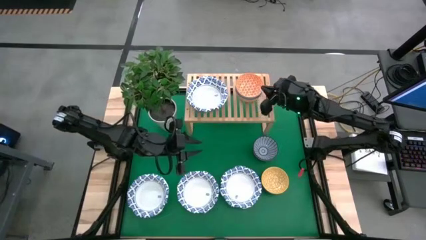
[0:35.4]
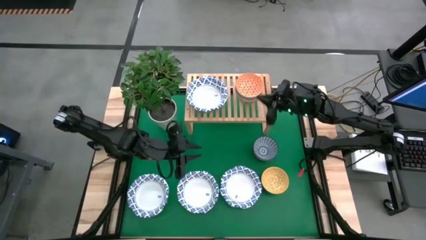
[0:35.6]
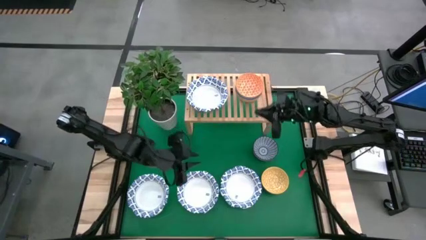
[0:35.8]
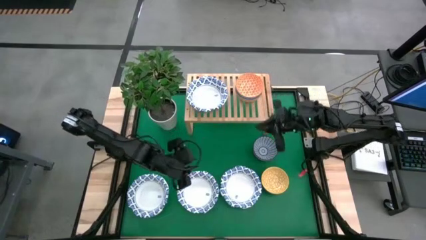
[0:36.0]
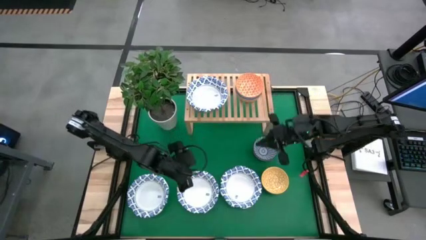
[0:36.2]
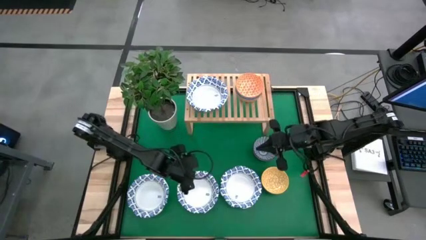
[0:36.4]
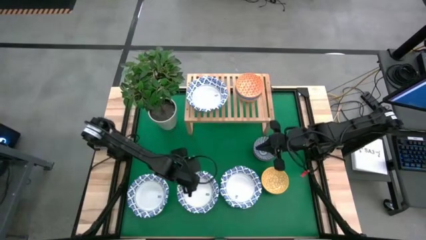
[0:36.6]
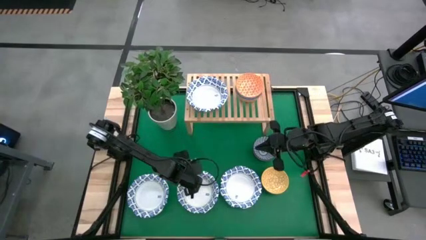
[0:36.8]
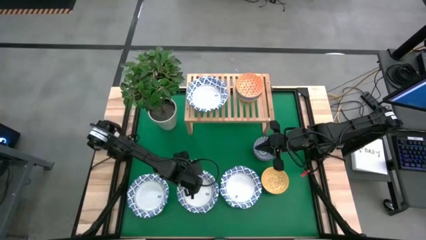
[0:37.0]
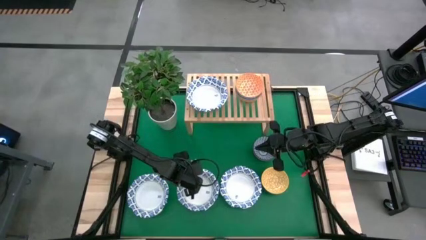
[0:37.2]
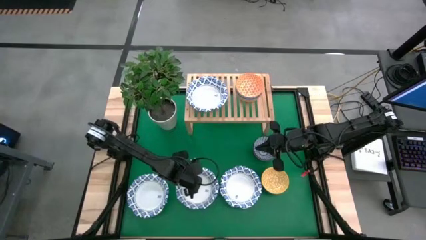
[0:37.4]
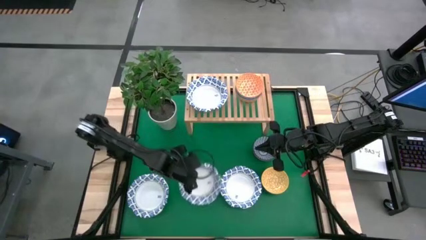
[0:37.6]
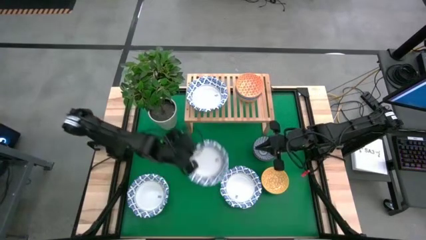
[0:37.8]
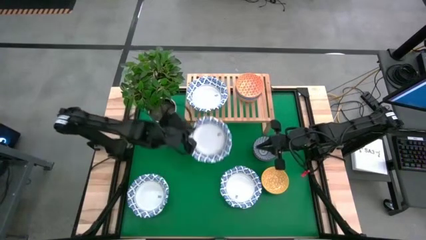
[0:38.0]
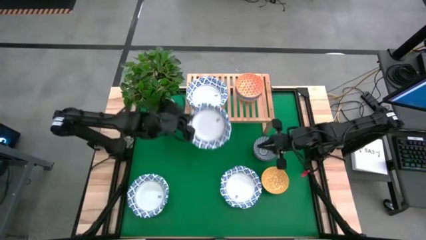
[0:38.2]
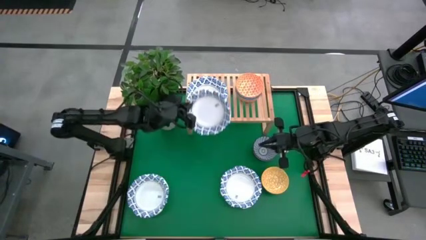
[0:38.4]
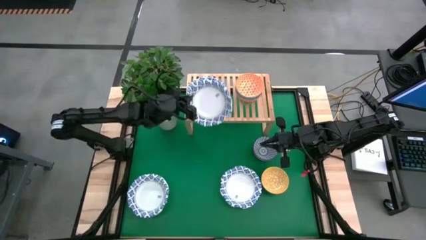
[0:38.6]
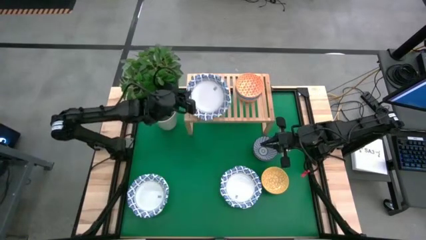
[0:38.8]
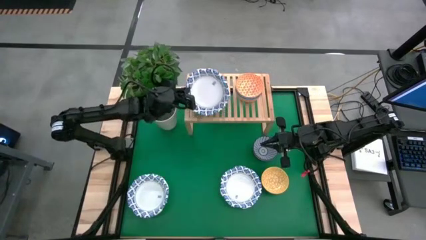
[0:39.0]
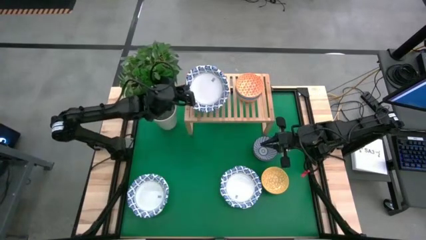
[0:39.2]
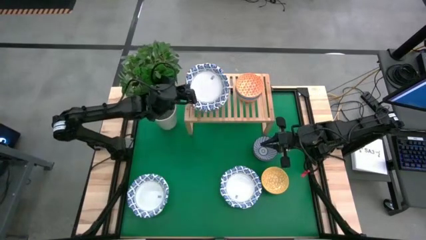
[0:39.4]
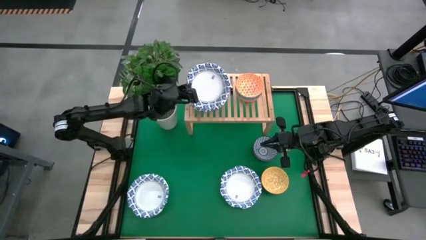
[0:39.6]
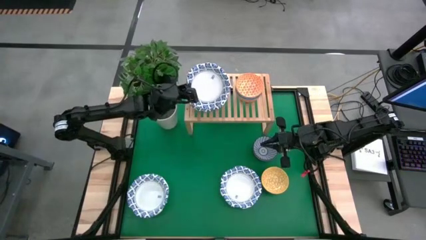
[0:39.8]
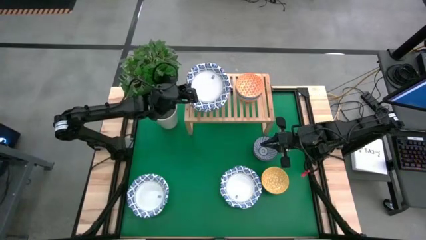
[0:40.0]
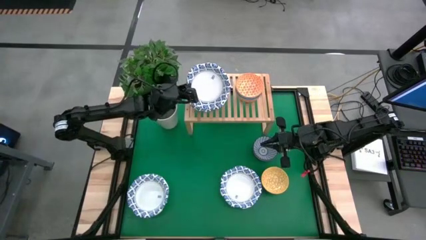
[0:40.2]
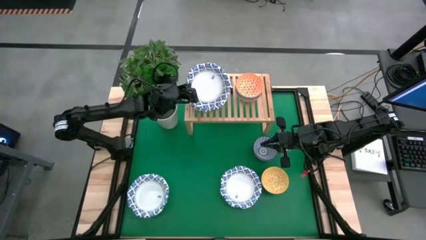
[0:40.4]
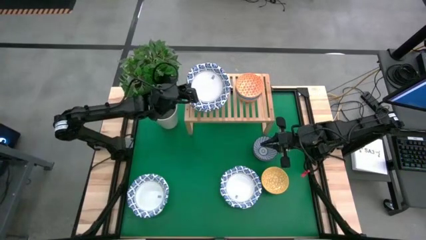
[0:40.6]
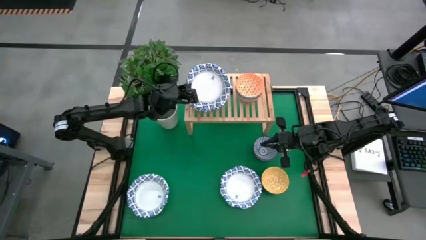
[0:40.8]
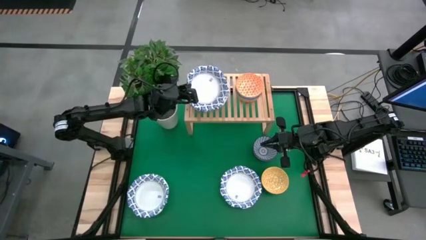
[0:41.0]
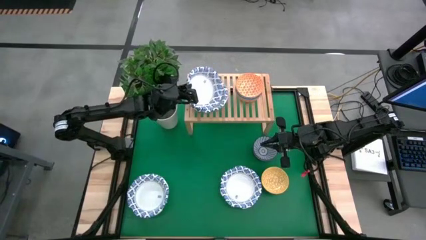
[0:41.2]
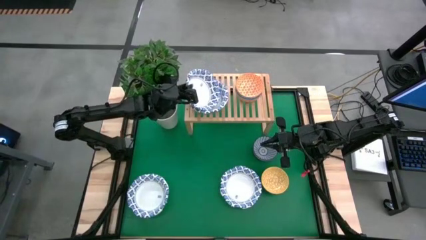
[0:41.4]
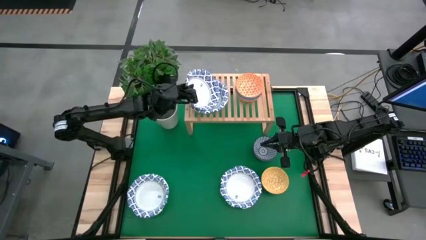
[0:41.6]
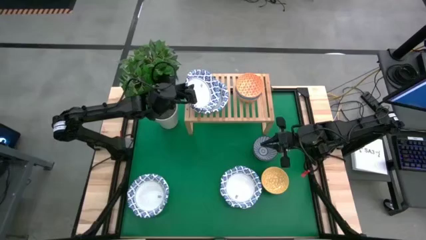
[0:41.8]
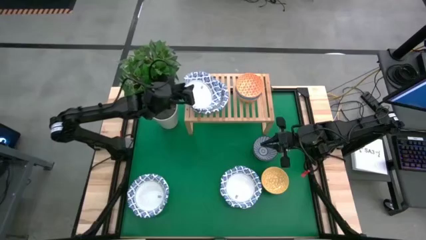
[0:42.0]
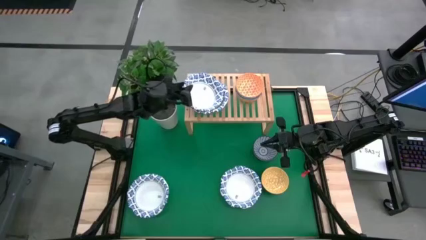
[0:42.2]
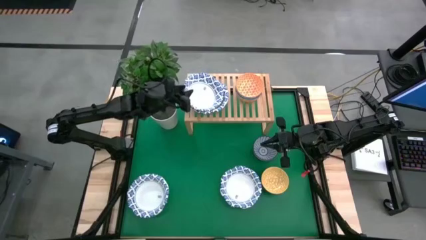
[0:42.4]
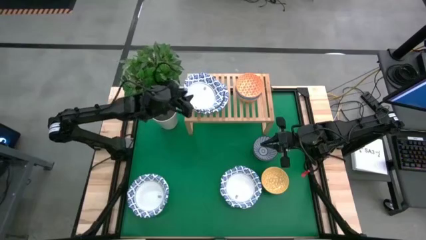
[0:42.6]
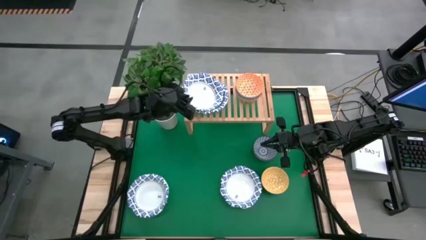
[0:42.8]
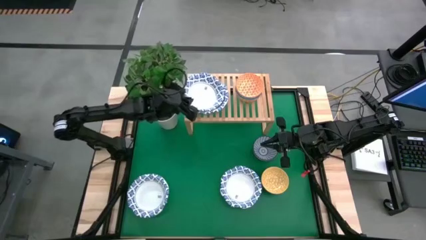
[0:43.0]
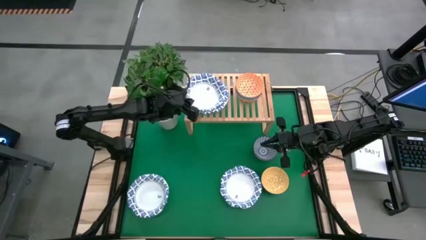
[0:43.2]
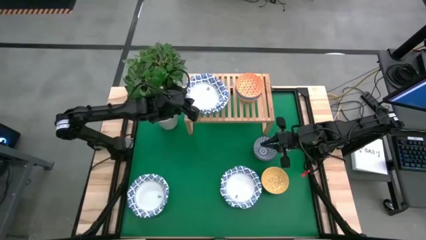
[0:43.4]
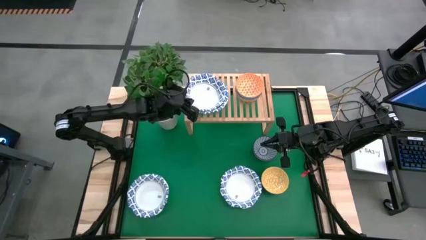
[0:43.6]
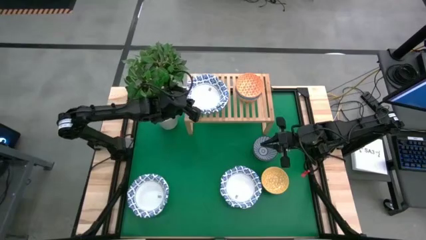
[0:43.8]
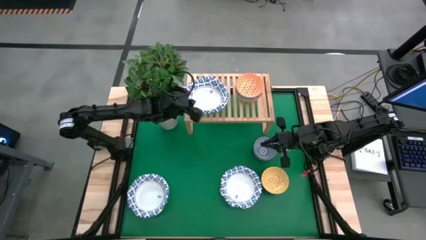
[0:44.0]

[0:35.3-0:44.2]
Task: Place and stack bowls onto a shelf
Stack the blue/white bowl on top of the blue/white bowl on the shelf

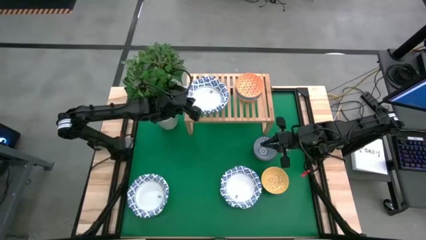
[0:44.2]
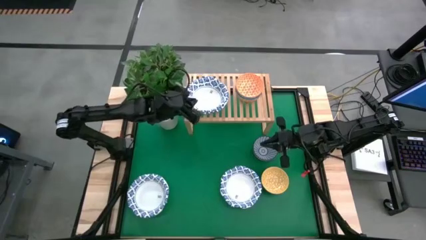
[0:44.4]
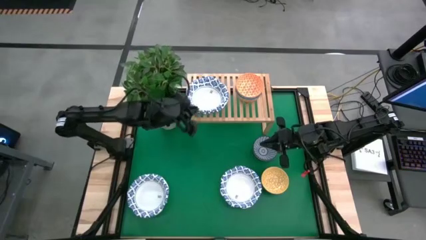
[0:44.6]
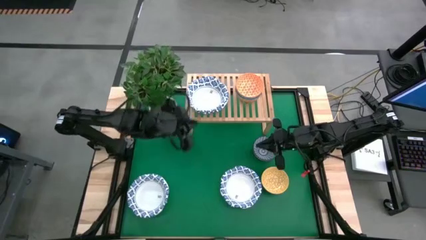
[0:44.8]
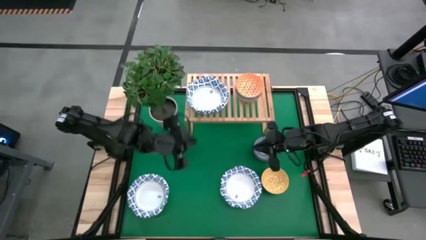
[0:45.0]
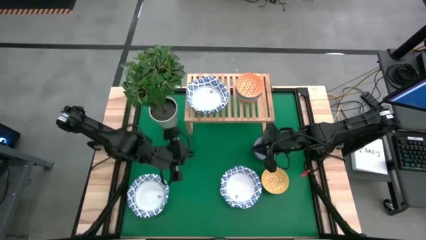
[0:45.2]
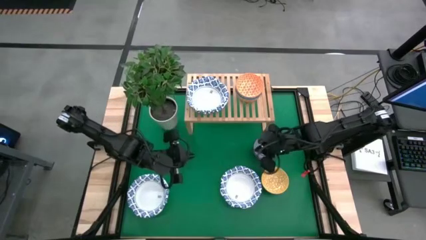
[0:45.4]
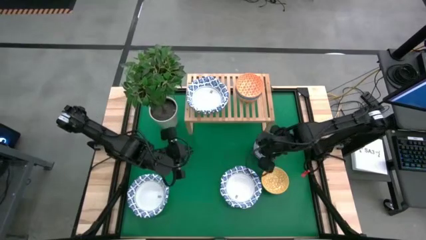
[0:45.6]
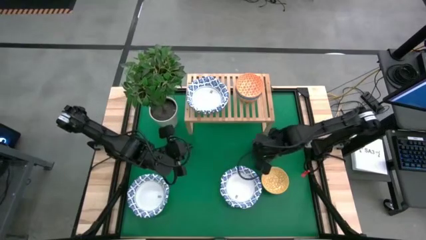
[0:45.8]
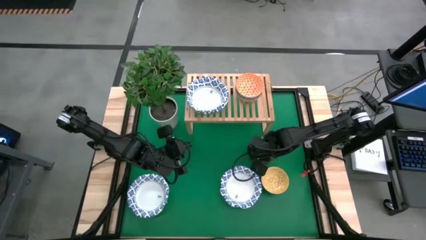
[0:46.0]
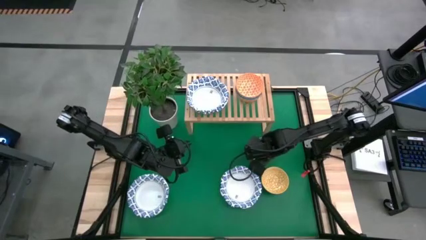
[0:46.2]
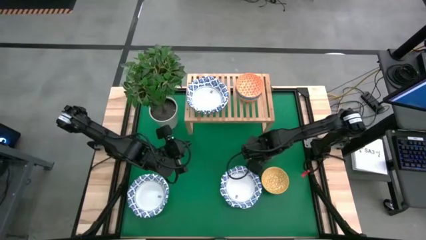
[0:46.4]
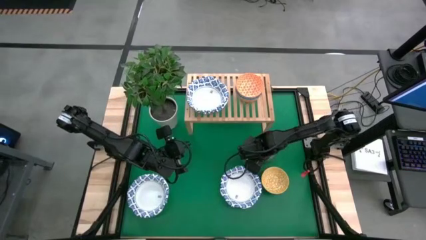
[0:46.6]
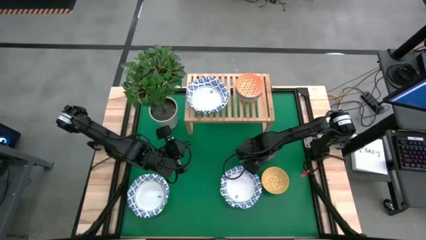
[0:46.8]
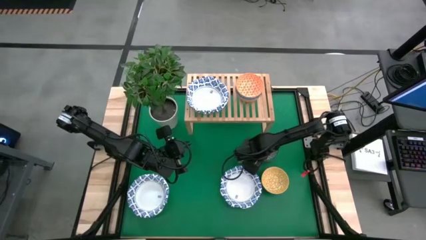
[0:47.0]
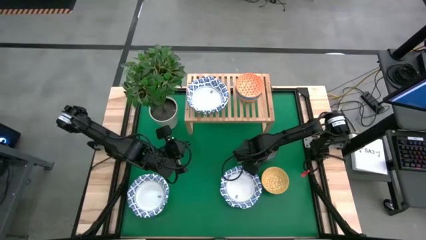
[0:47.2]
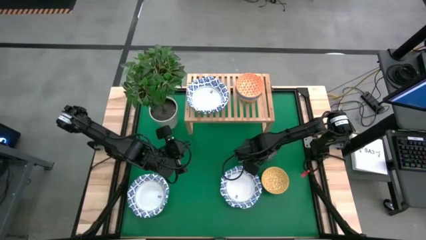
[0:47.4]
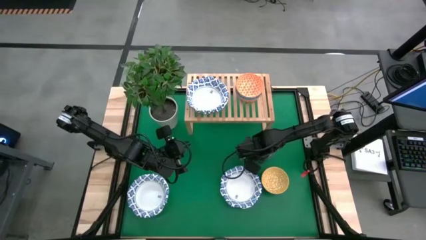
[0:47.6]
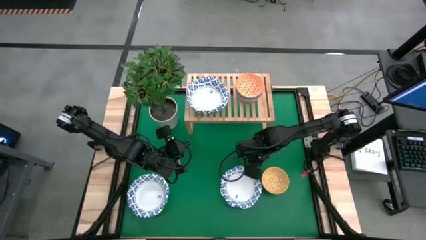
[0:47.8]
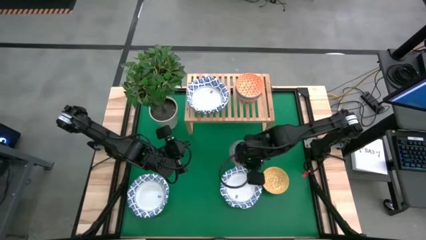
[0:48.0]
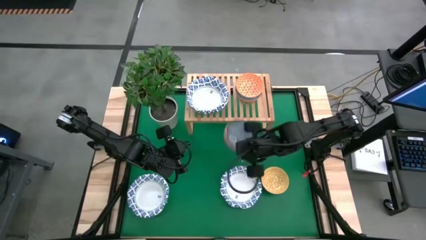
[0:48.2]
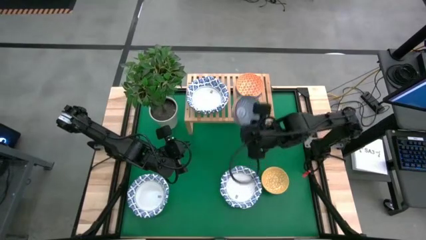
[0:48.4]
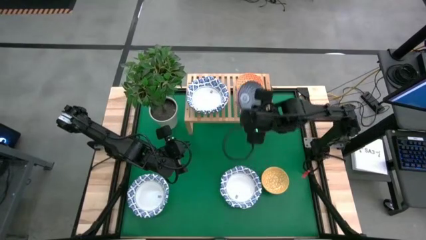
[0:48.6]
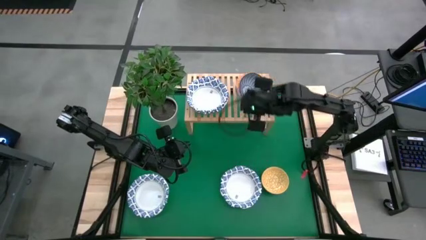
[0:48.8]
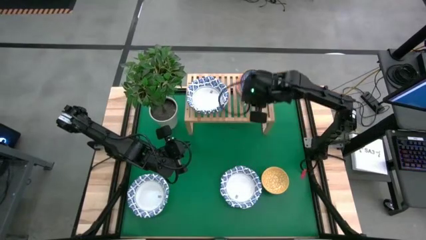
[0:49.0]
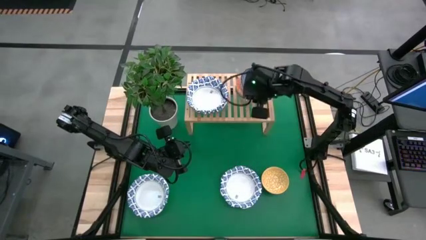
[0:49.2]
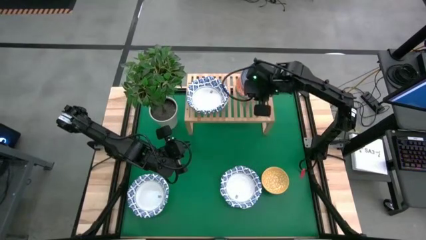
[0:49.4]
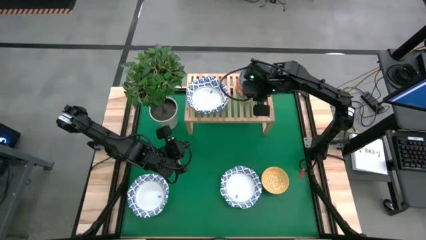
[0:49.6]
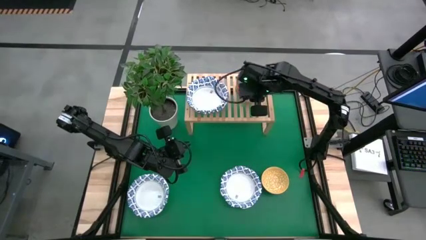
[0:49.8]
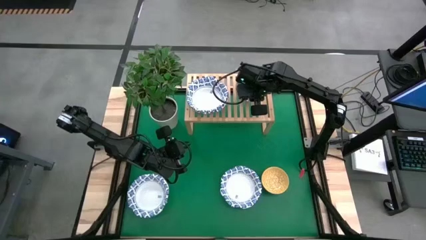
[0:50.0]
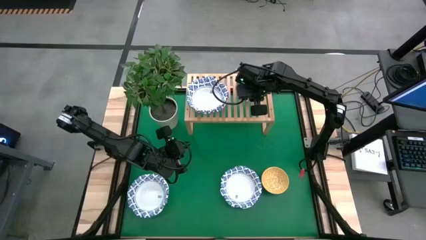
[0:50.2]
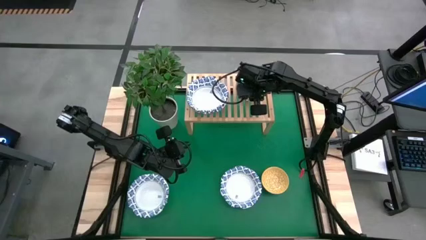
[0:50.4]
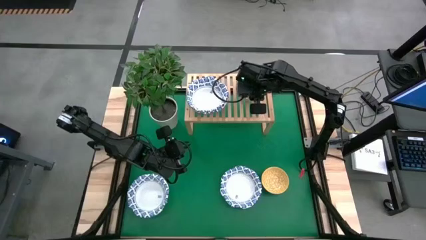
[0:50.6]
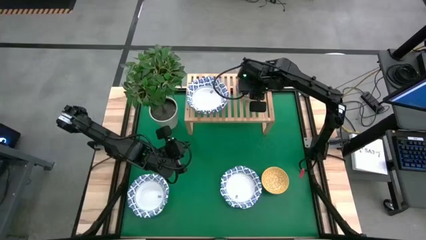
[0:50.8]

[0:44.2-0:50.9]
Stack the blue bowl on top of the orange bowl on the shelf
